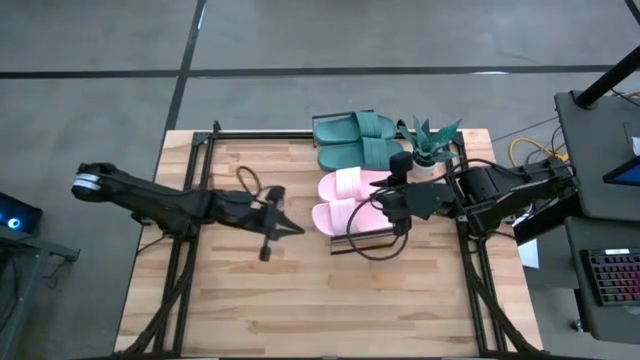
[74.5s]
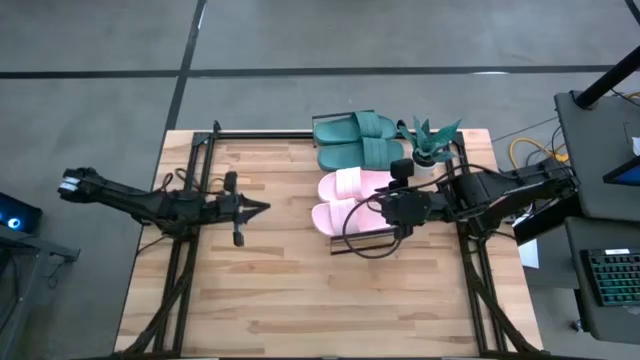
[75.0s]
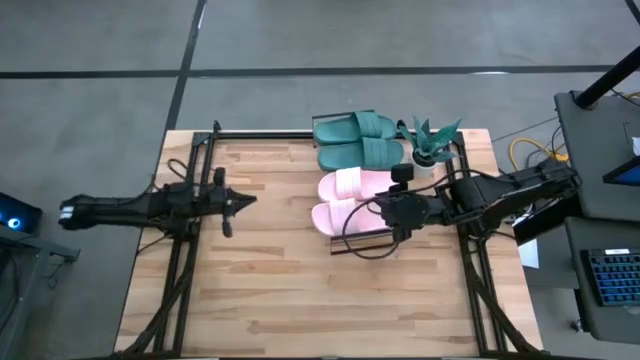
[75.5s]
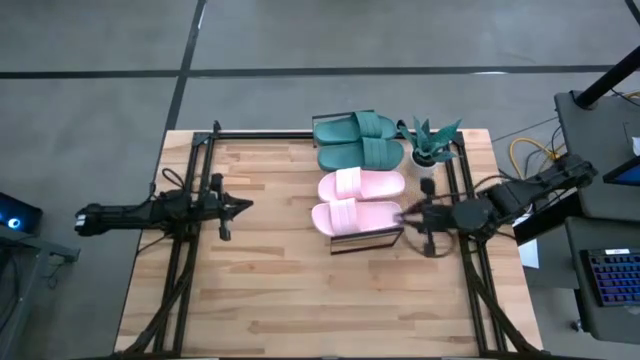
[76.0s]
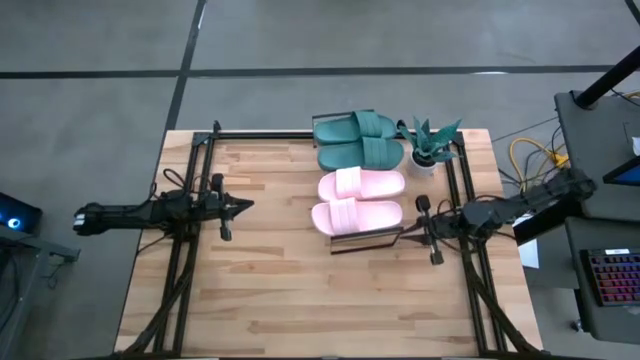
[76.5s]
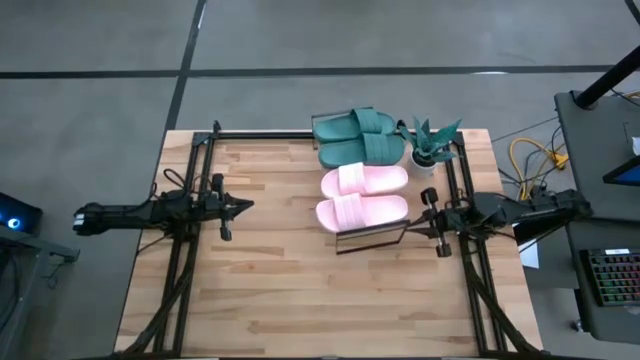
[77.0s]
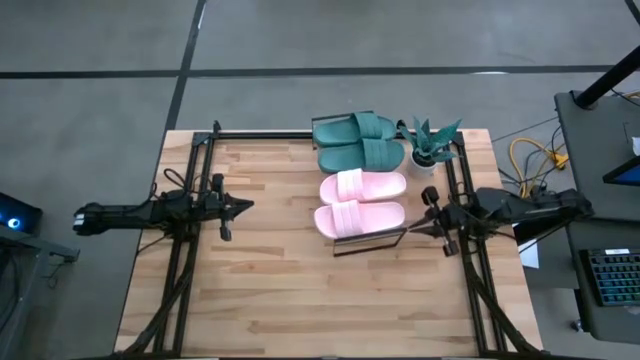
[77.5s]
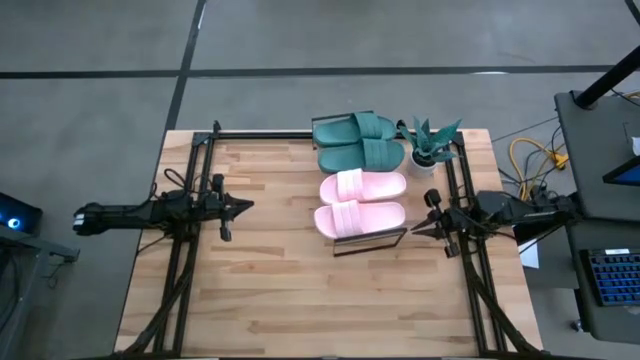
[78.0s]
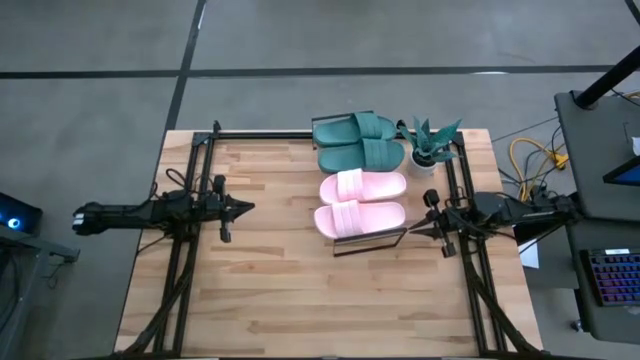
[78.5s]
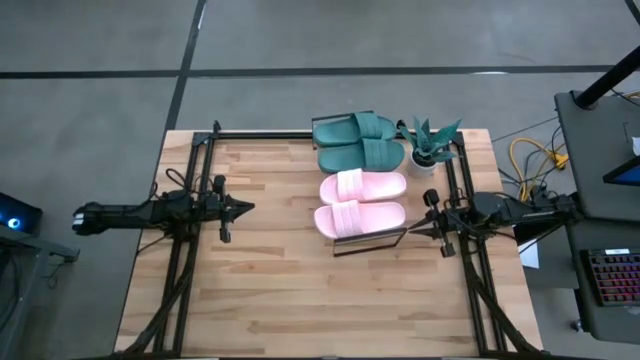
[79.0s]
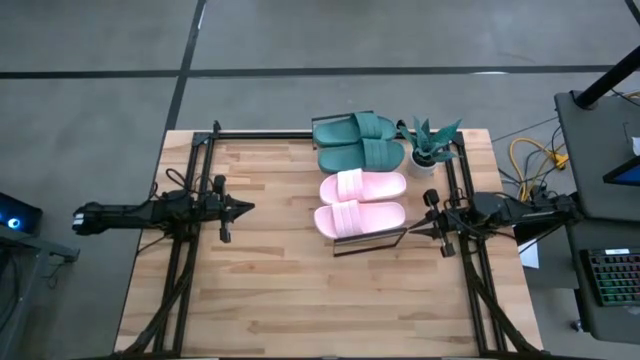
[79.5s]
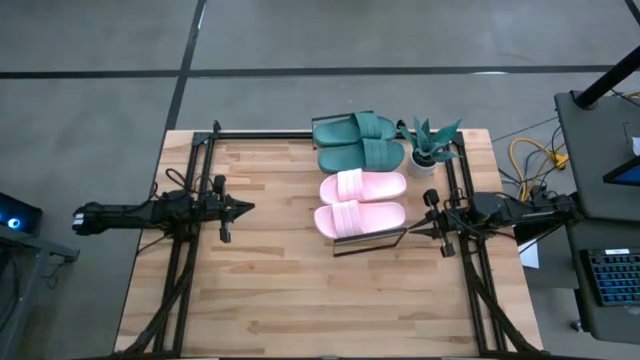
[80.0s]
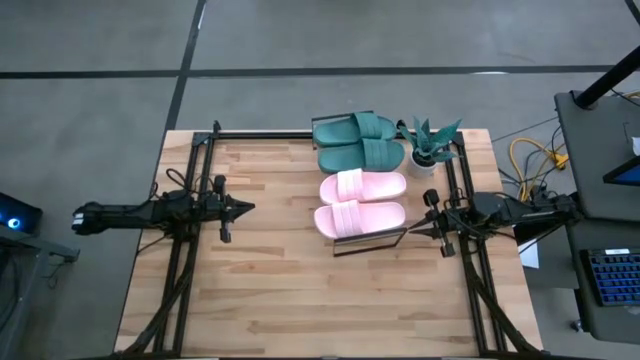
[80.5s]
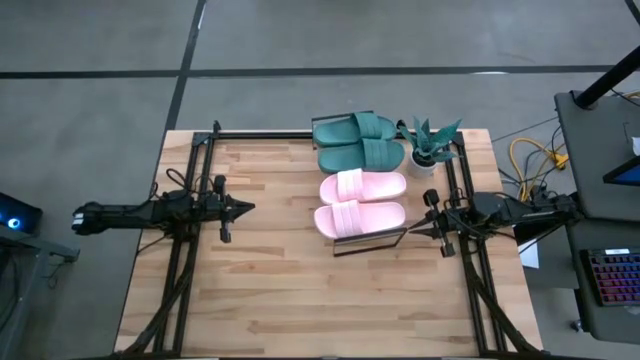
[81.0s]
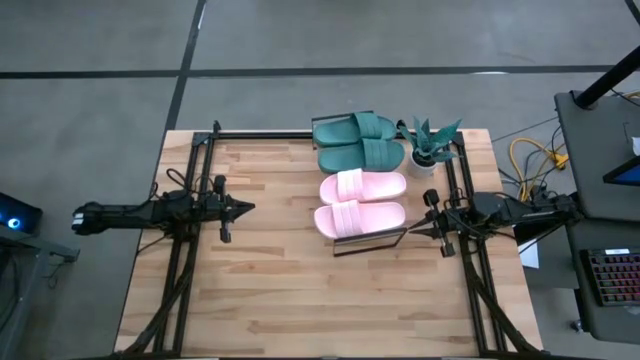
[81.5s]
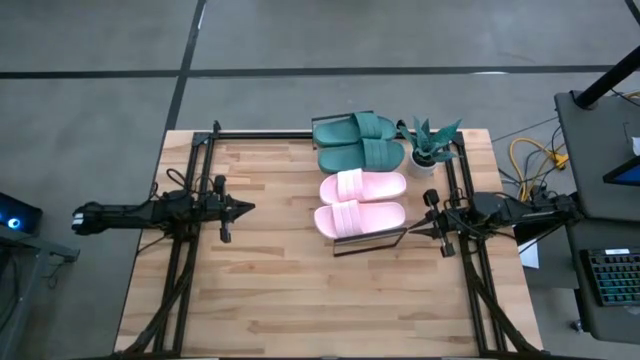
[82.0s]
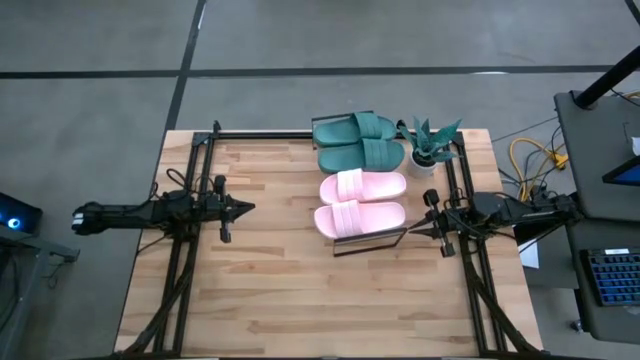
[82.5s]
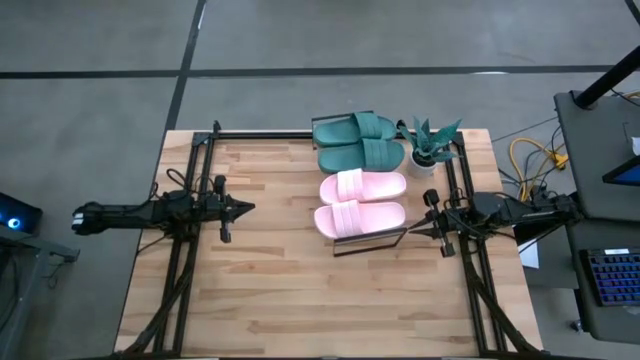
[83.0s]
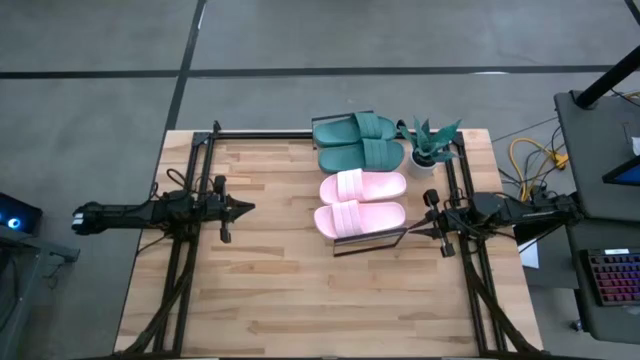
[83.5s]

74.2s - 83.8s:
Task: Pick and place slides into the shelf
Return to Home Position

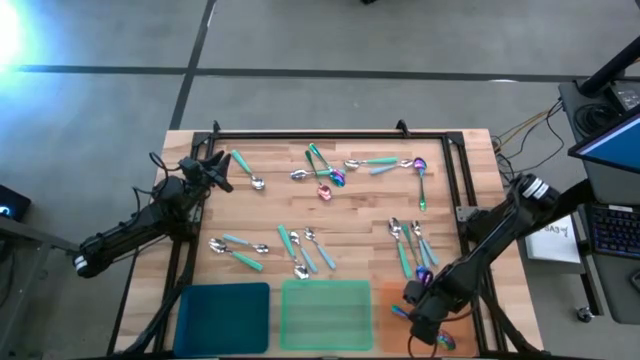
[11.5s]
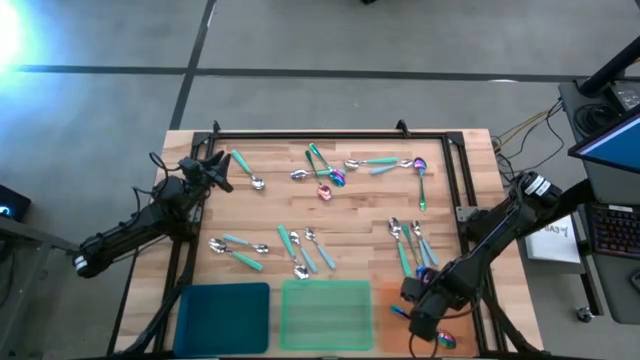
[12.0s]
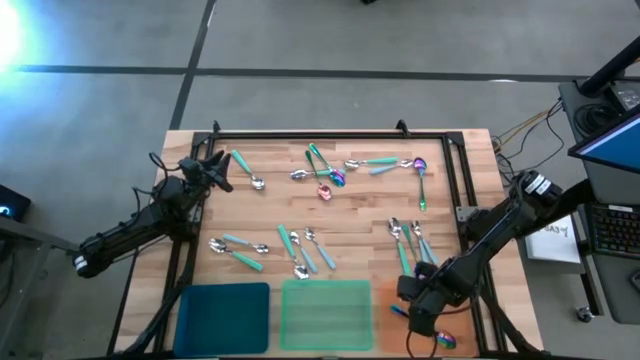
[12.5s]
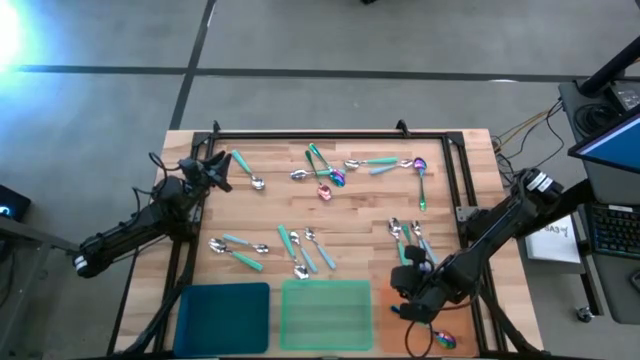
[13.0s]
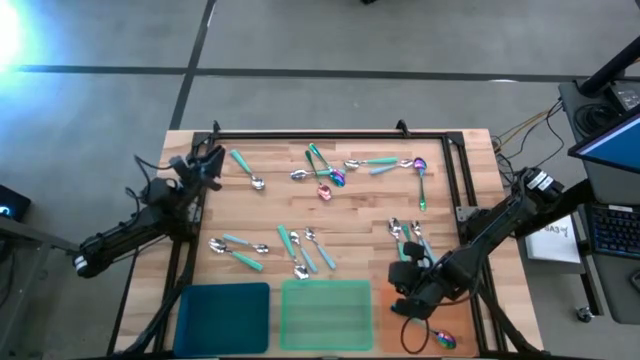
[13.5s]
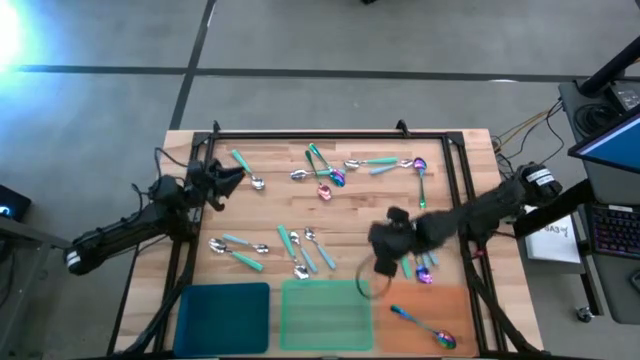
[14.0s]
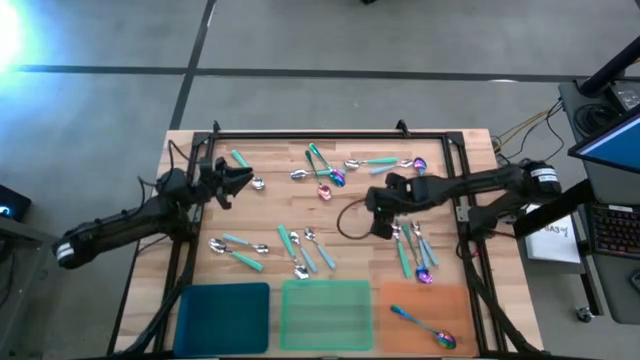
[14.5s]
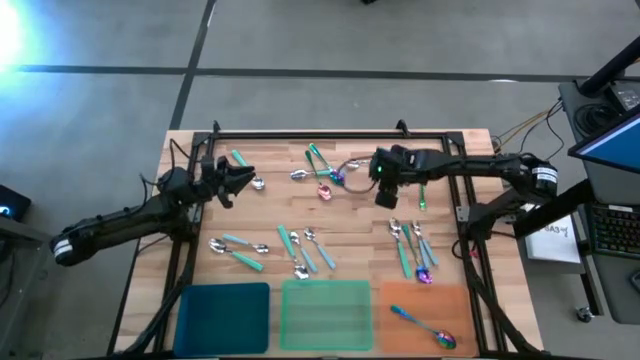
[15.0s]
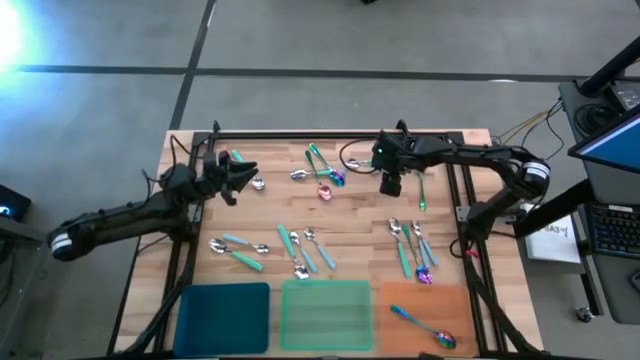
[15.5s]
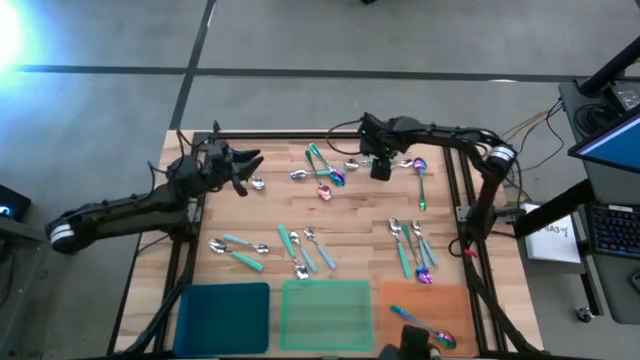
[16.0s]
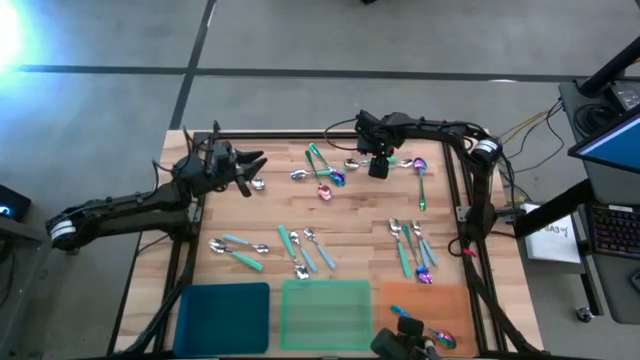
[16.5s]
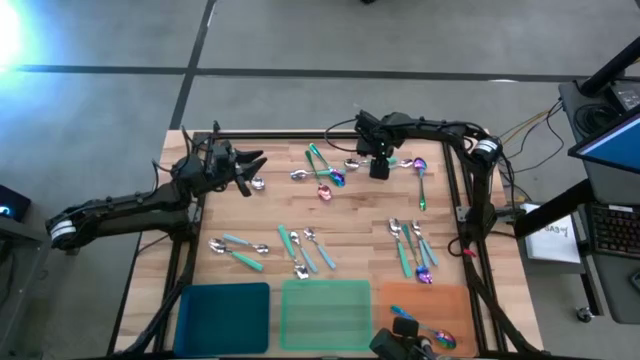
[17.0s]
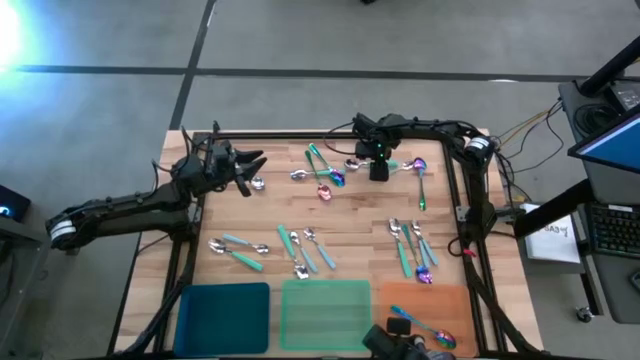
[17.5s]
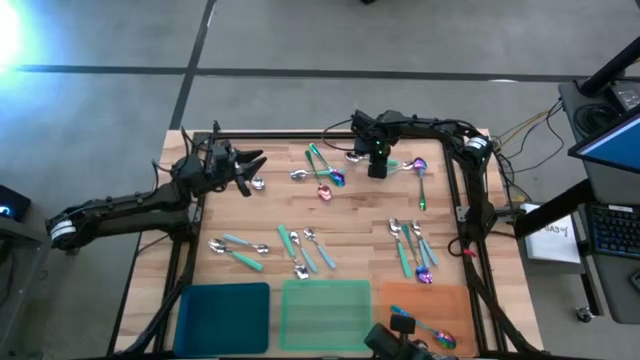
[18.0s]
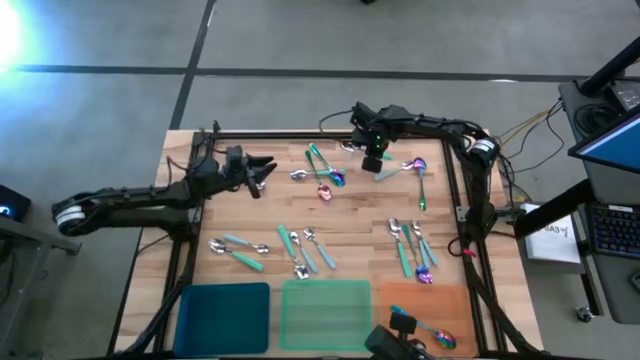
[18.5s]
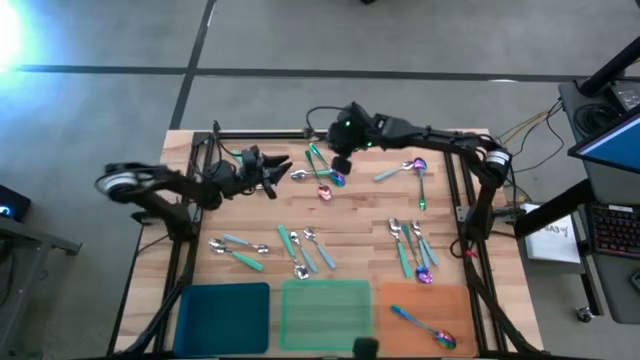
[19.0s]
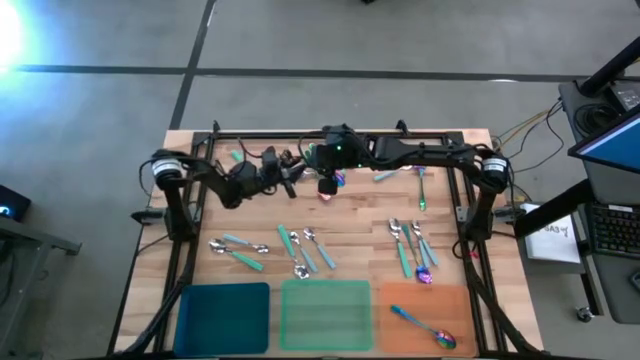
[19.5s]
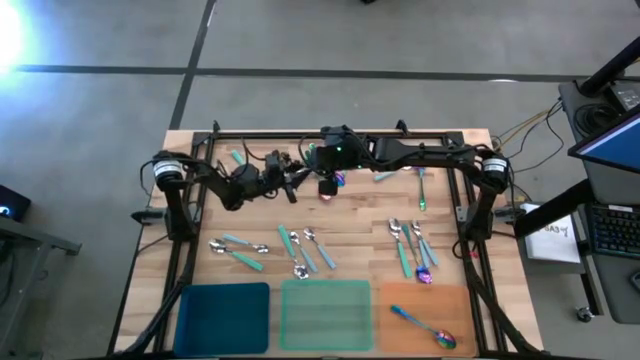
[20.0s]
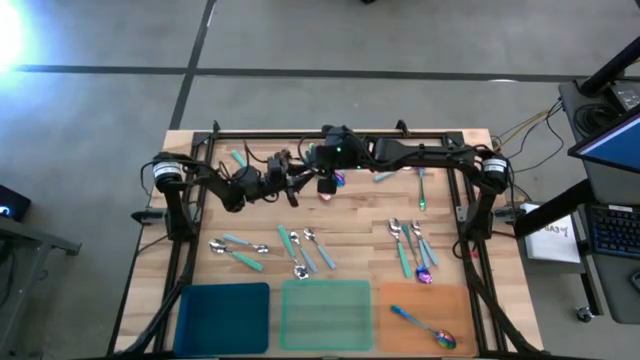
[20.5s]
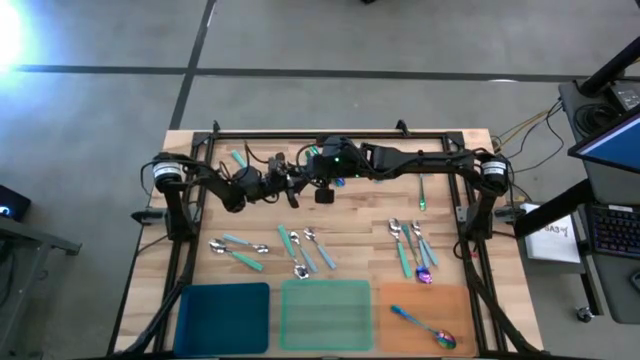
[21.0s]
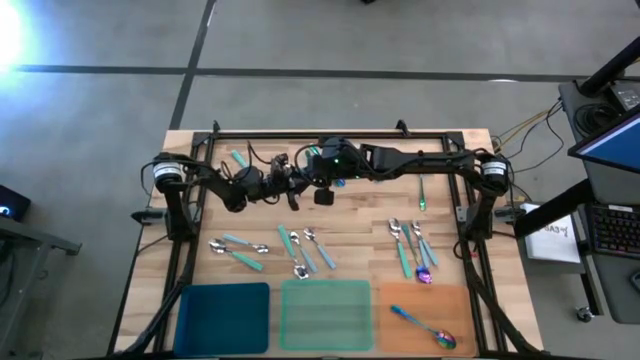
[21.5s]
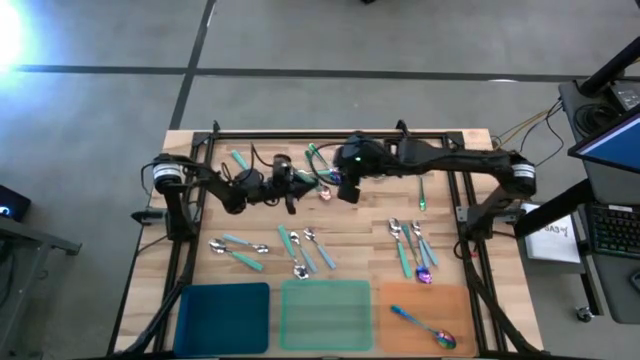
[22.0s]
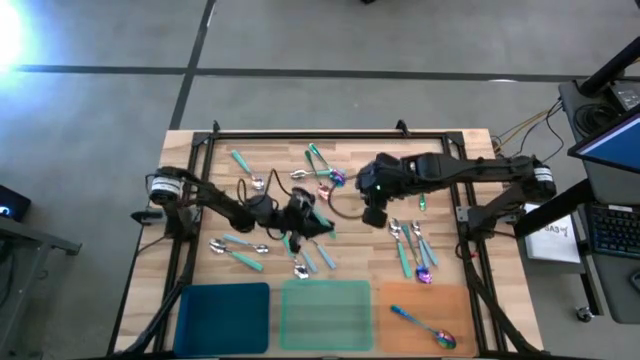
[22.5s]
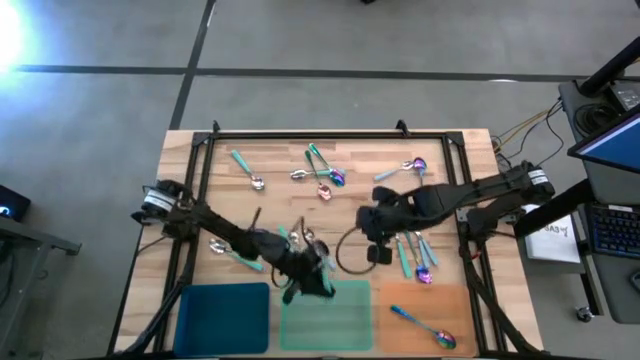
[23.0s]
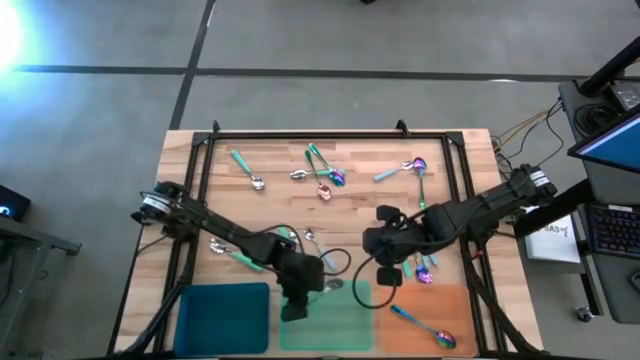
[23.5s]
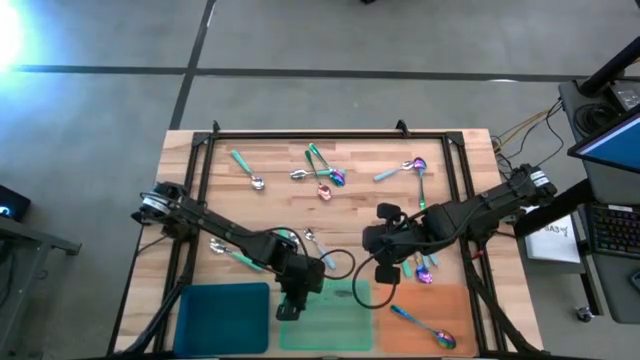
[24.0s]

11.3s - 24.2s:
Task: Sort silverware by color (type)
Put the light green spoon into the light green bin
